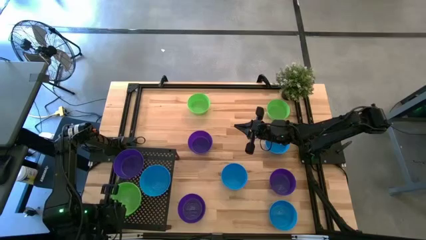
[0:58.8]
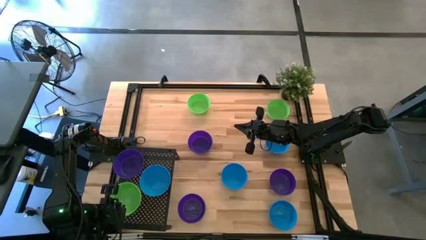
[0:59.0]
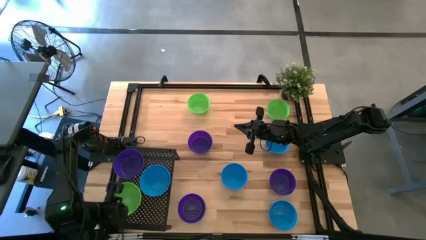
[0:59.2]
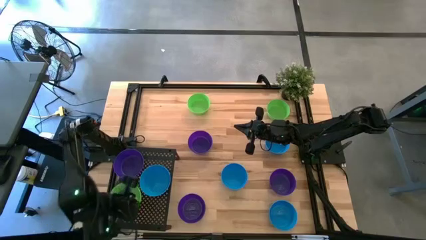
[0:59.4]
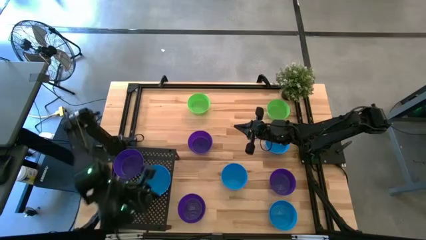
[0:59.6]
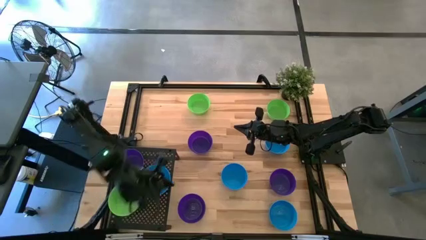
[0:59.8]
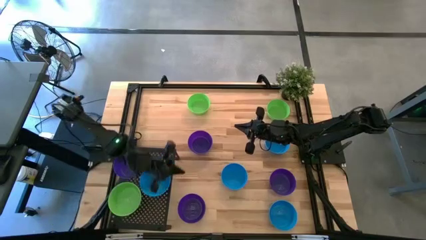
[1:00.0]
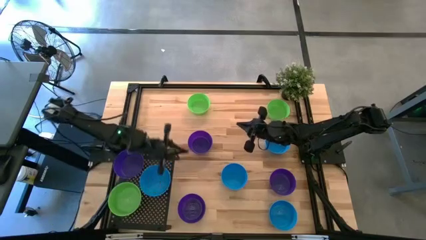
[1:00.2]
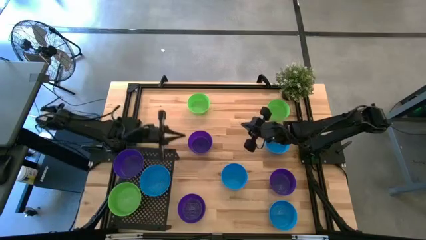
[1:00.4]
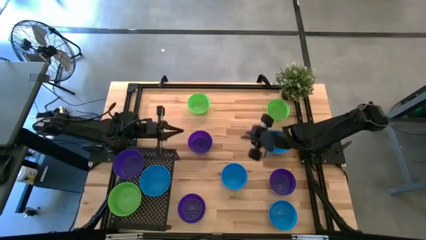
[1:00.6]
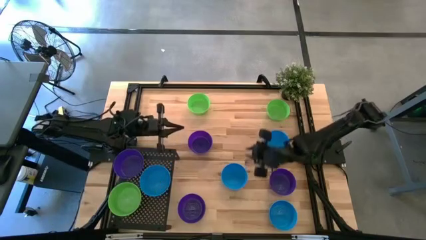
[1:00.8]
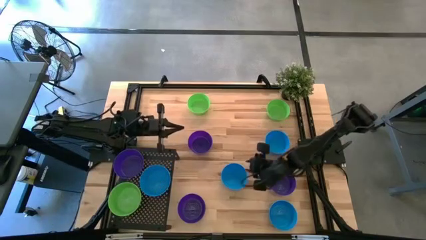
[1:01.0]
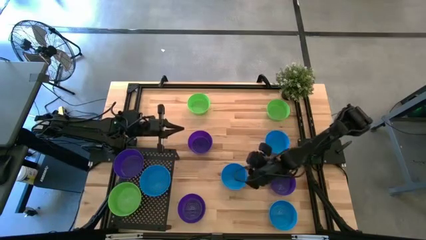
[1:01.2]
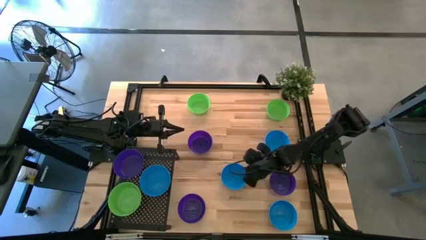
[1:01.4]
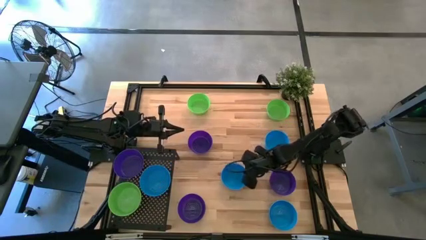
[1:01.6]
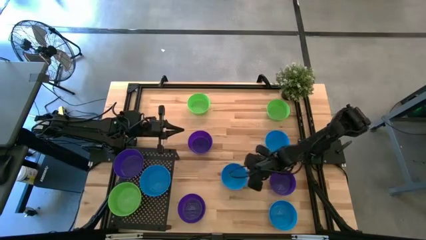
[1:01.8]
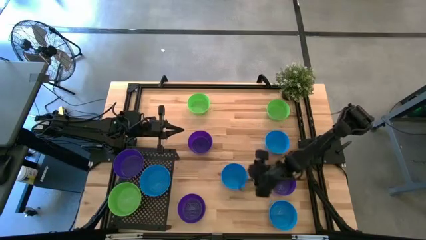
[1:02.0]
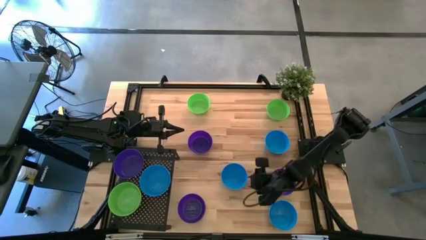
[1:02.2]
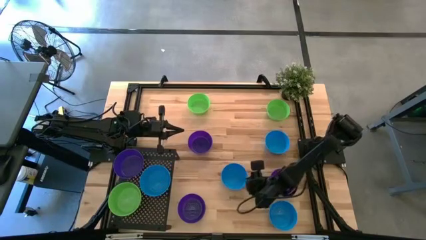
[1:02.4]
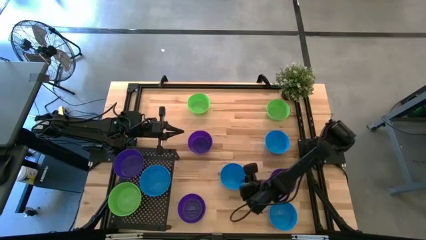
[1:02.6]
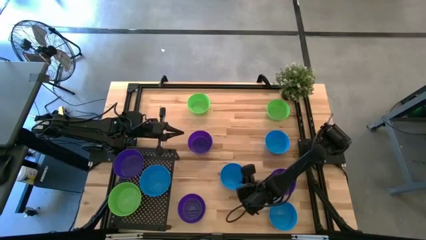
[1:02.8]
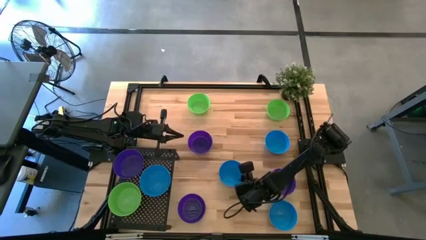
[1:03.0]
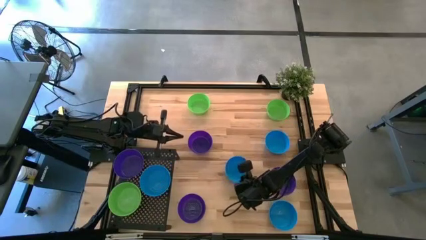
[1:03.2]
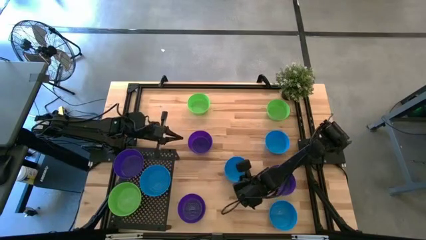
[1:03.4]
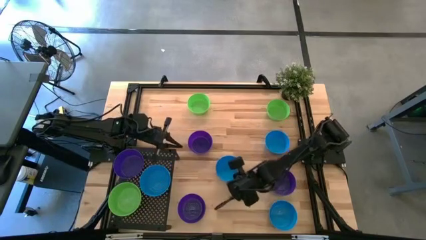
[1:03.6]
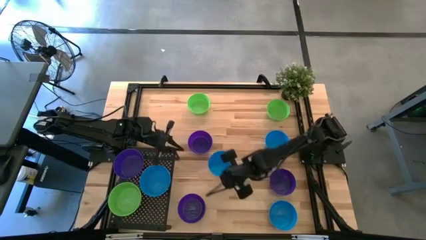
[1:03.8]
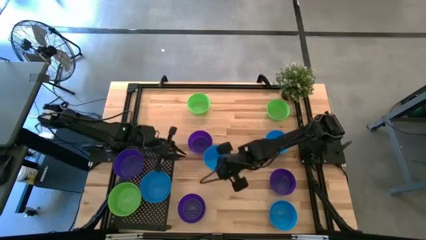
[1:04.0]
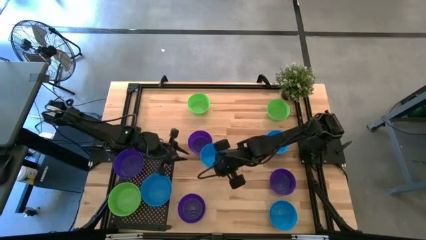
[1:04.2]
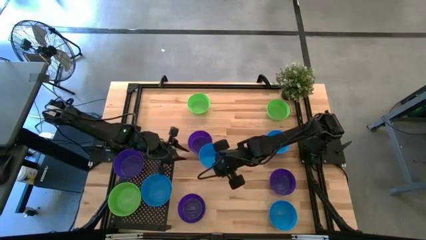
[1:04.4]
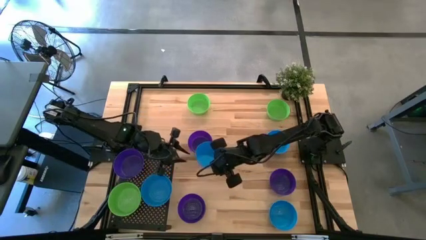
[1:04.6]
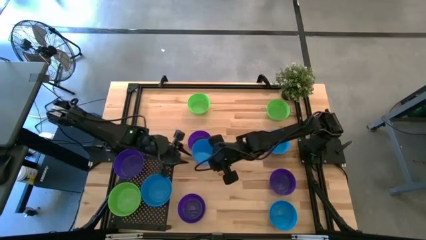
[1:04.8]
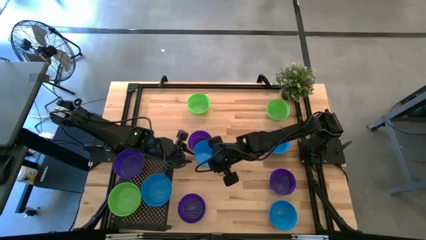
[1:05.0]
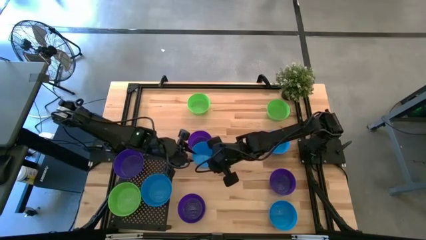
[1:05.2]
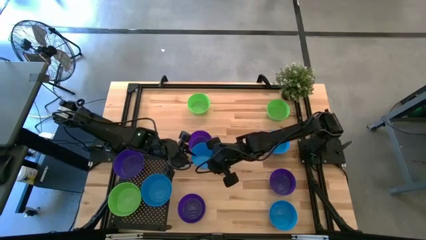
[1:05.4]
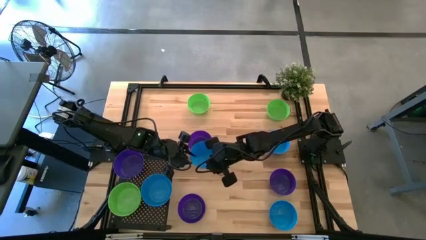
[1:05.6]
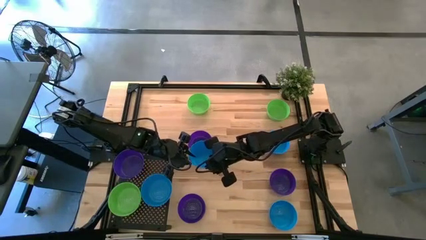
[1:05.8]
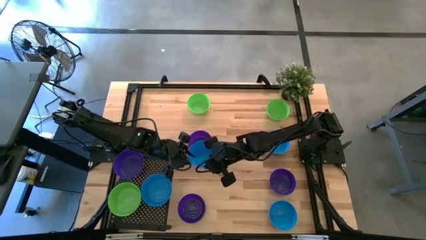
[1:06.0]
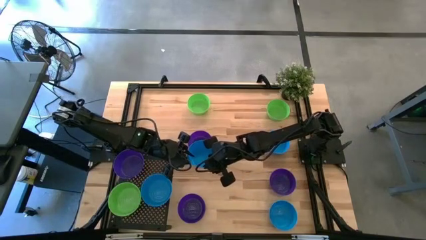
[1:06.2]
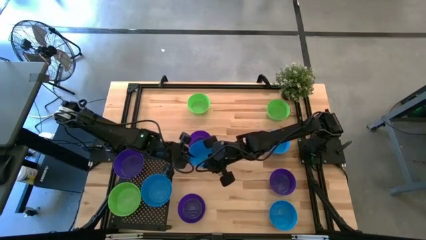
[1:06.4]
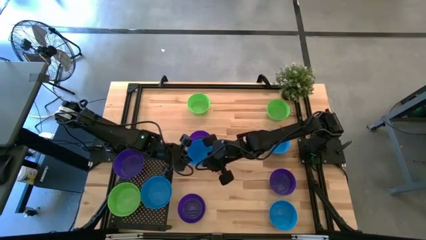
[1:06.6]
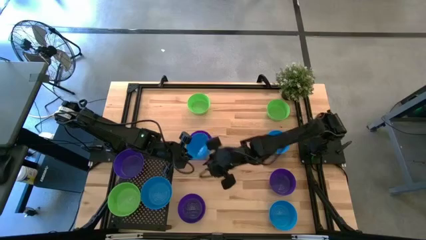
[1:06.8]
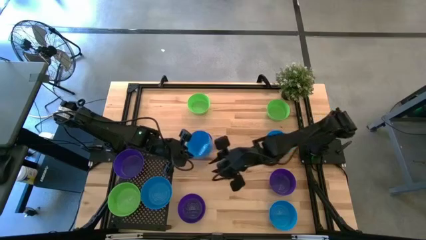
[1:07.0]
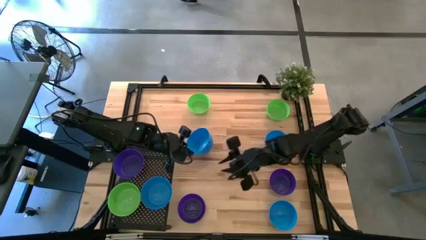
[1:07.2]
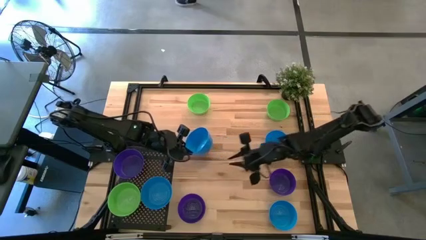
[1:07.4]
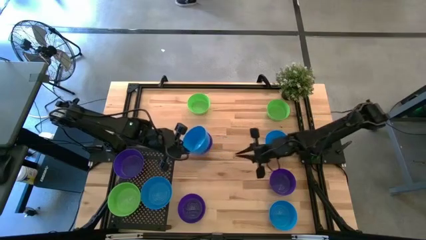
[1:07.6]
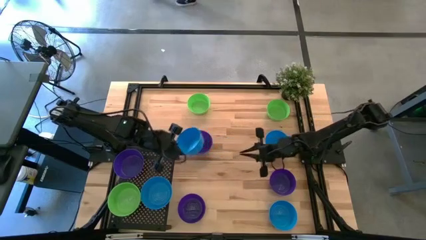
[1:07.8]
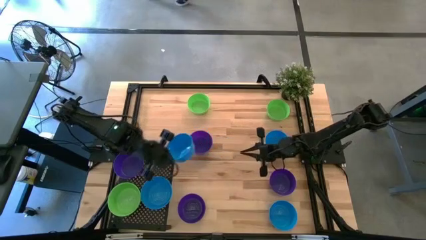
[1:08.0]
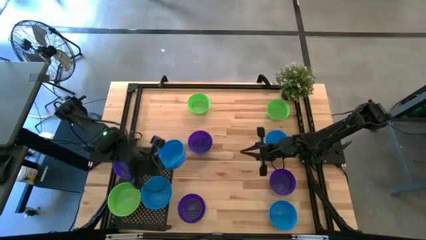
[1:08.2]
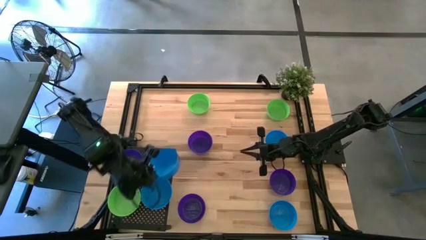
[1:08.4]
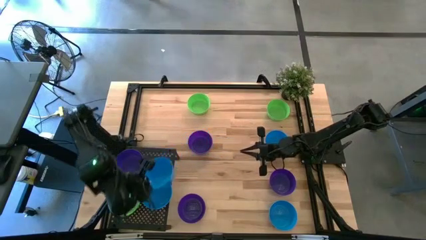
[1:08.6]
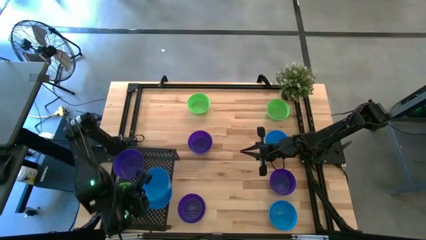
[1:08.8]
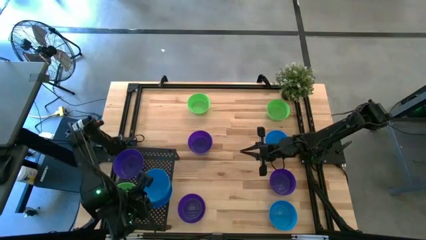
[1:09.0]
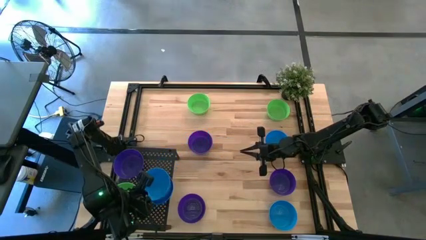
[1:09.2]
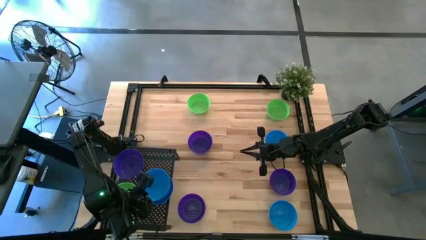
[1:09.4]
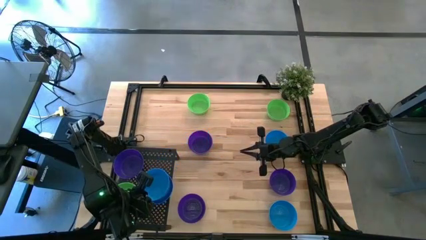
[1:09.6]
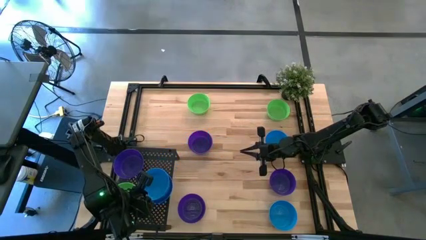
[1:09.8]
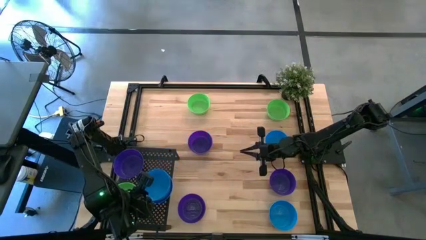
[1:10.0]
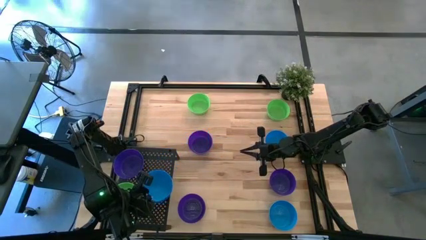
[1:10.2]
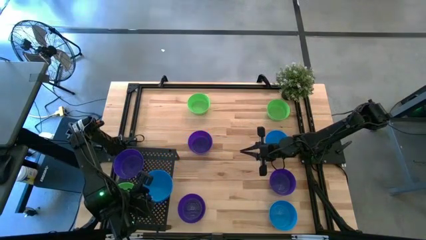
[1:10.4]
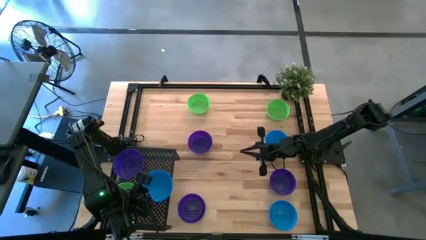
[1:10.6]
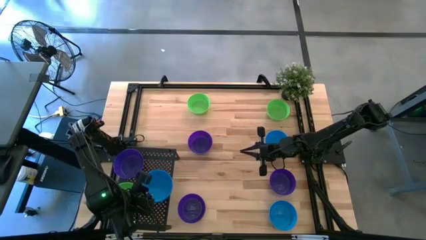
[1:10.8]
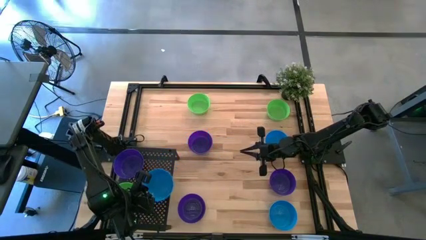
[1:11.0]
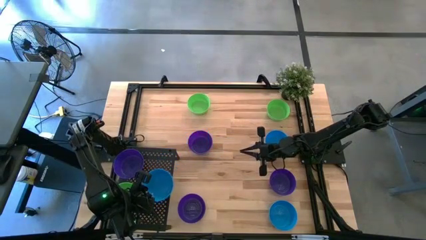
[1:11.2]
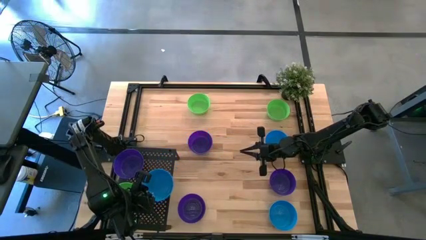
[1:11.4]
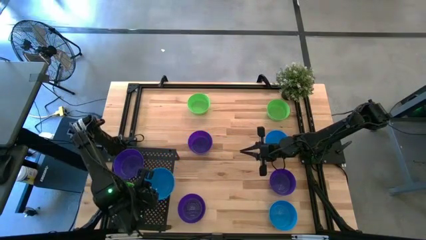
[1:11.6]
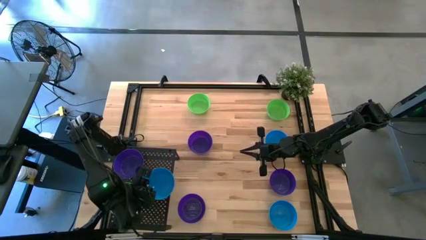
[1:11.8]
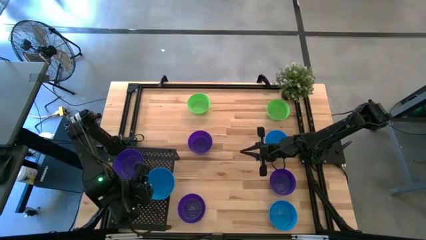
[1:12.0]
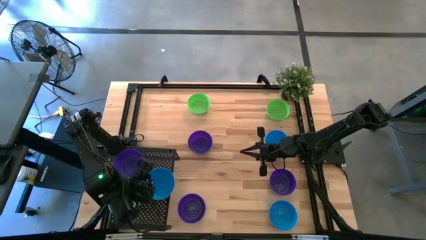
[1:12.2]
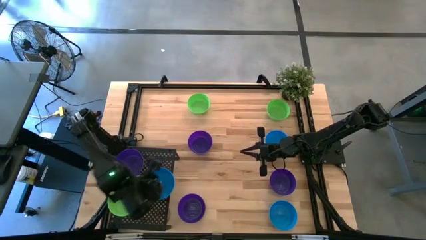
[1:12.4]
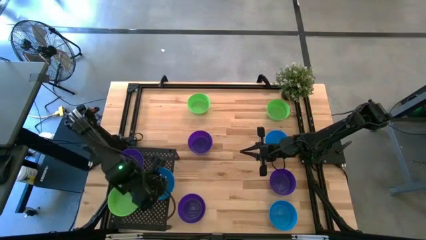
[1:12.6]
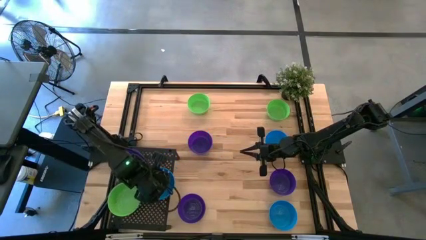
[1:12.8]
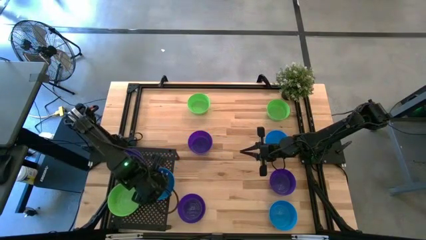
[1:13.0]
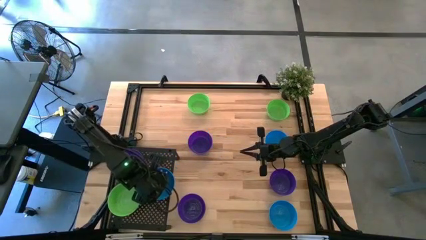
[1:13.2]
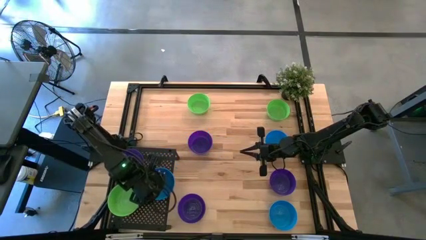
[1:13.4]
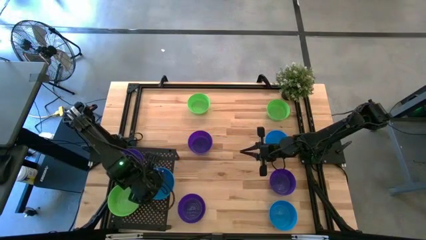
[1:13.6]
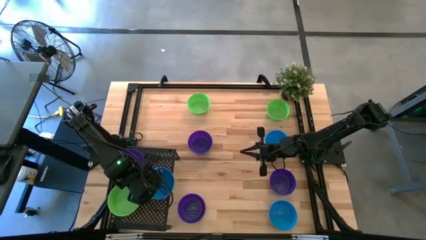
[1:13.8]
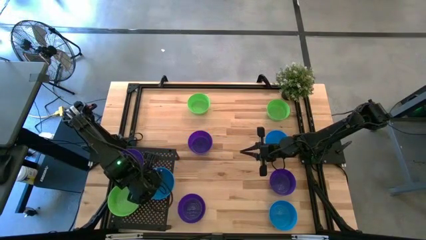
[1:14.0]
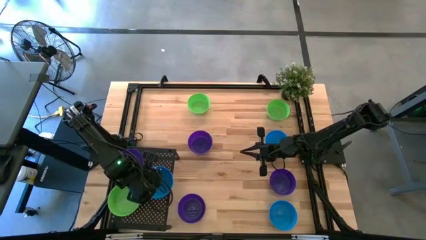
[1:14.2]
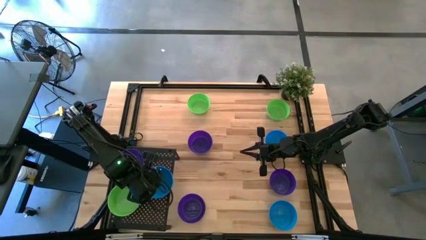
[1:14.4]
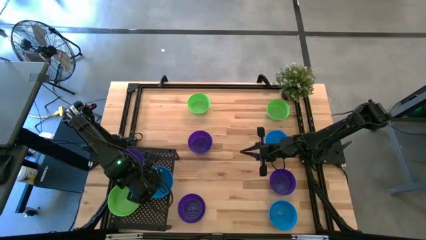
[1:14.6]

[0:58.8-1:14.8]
Task: Pick & Place Mini bowls
Stack the blue bowl on the other blue bowl on the shelf
